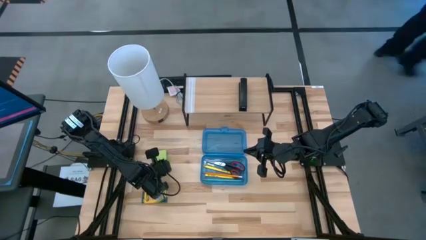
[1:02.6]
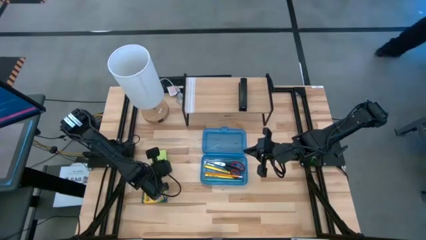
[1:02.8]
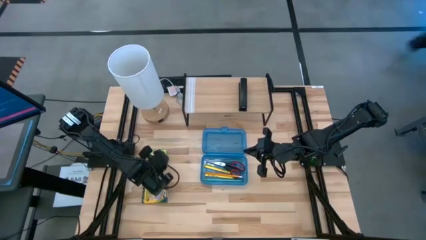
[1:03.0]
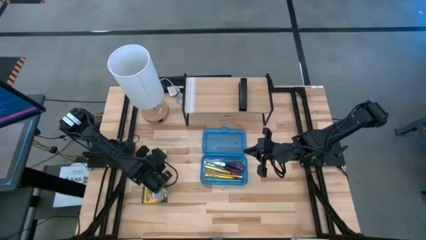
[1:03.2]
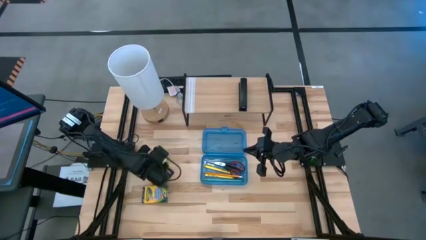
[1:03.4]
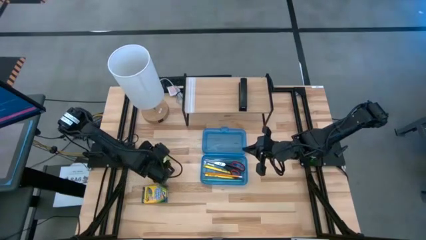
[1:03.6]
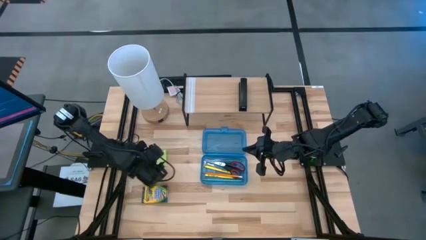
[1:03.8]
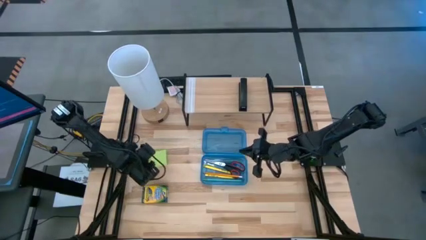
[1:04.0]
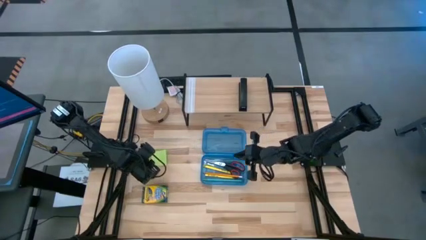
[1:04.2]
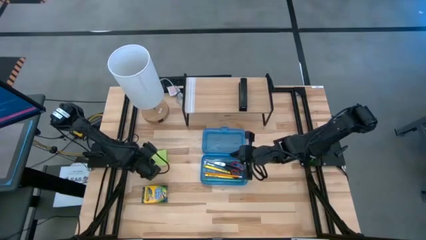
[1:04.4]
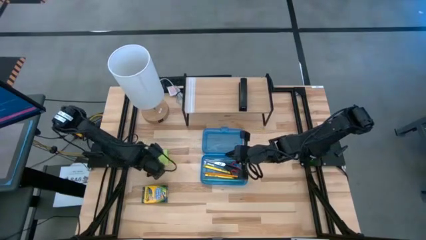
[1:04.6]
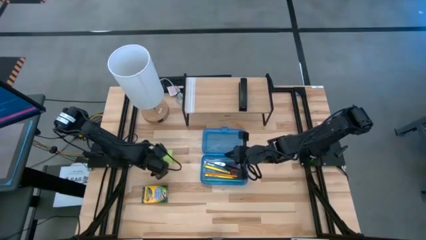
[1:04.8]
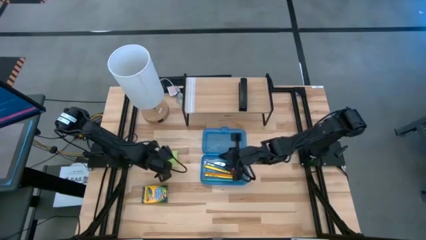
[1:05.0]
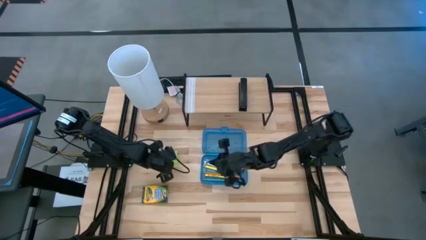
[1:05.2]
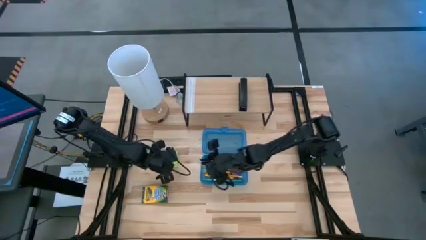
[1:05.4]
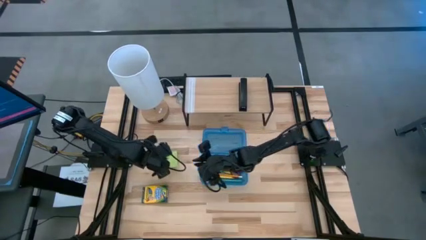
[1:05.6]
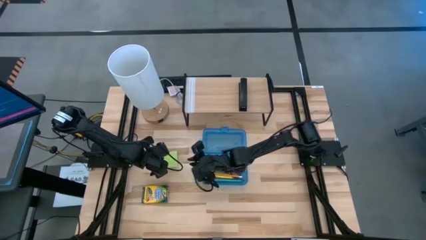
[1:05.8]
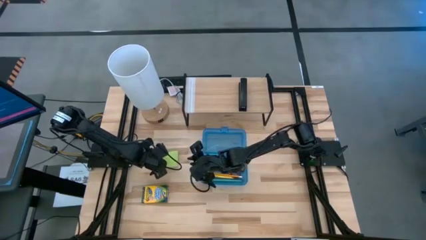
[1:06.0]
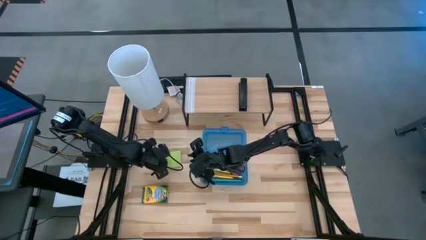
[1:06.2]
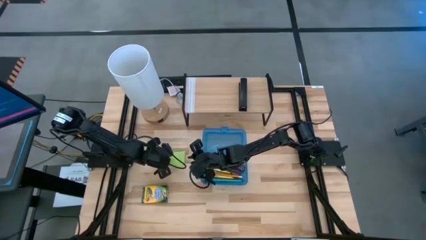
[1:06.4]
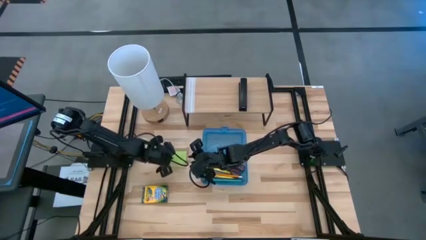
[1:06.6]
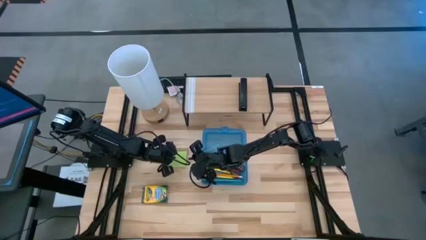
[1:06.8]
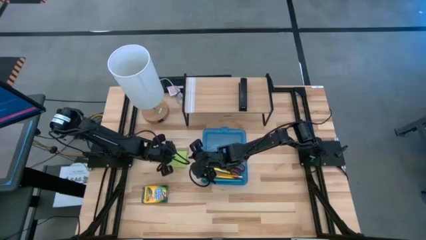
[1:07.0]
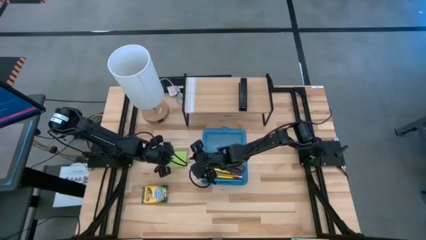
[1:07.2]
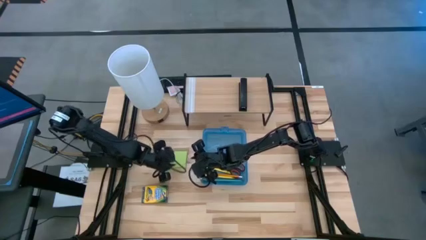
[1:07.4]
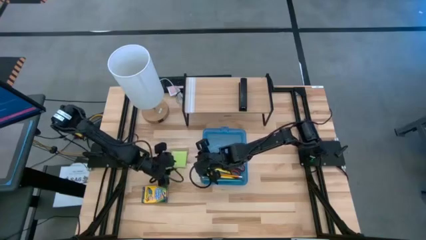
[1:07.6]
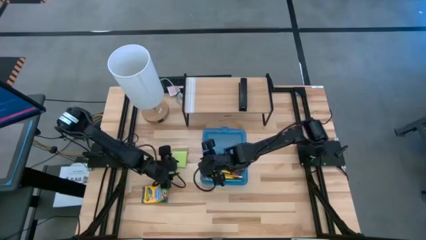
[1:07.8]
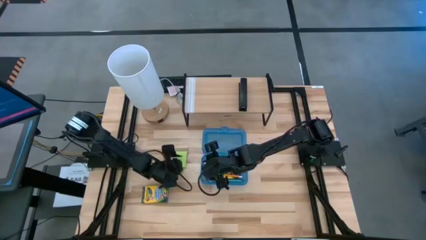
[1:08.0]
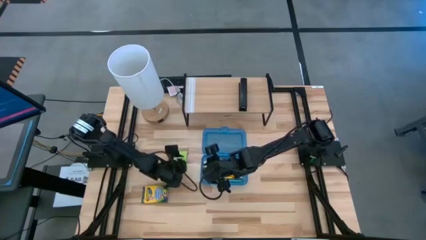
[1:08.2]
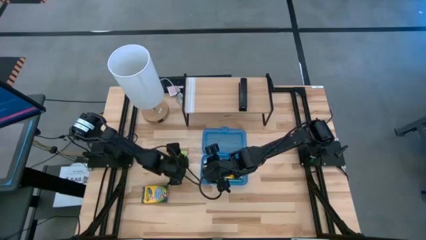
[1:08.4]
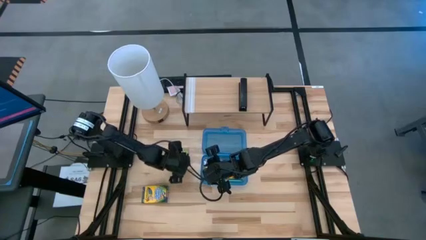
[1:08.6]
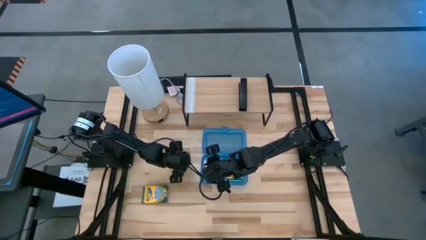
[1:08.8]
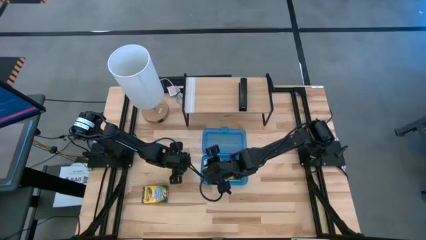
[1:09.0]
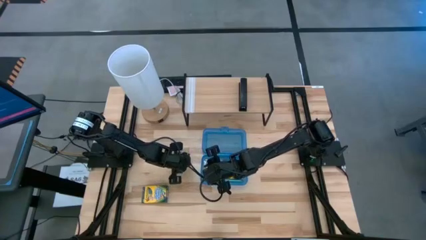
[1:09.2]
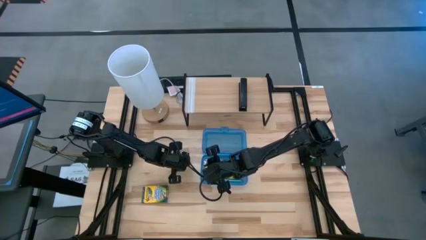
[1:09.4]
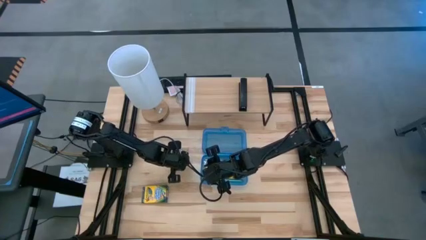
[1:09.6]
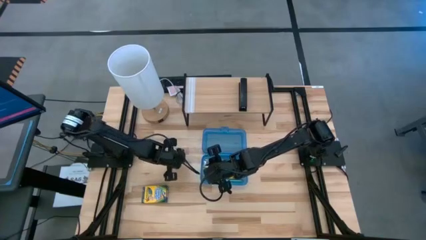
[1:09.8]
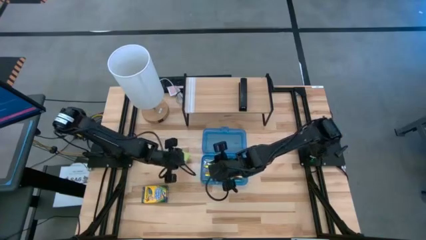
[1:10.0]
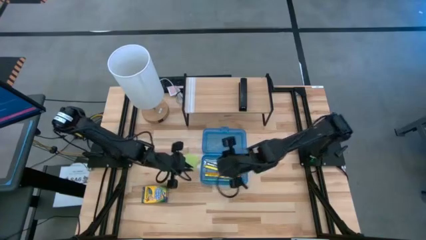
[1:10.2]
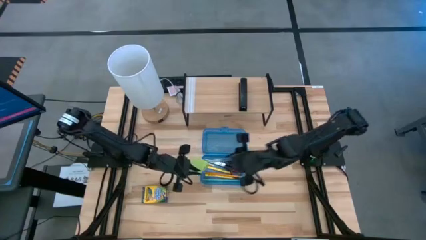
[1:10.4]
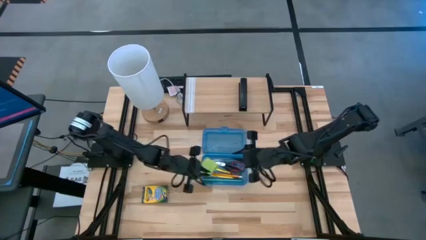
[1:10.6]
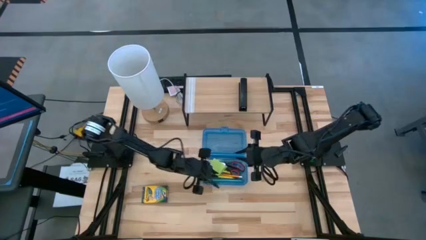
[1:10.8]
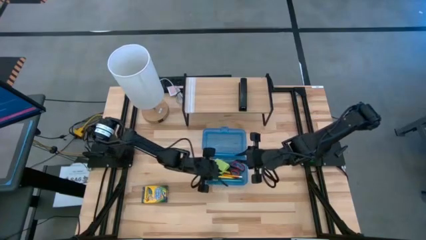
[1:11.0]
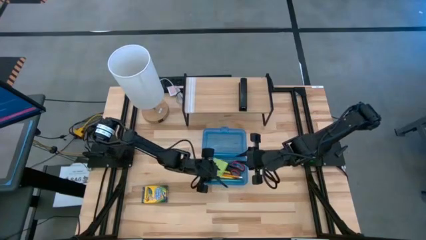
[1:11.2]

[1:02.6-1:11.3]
Task: Pack school essentials
Put the green sticky notes into the blue supply box

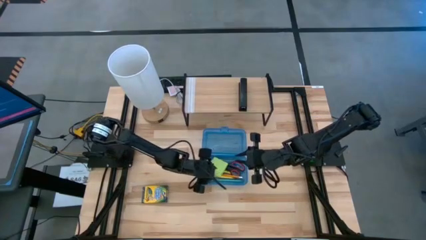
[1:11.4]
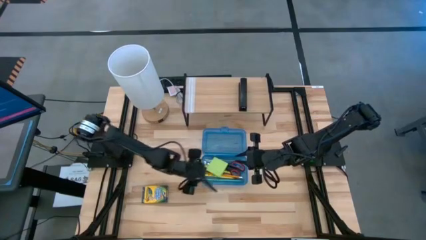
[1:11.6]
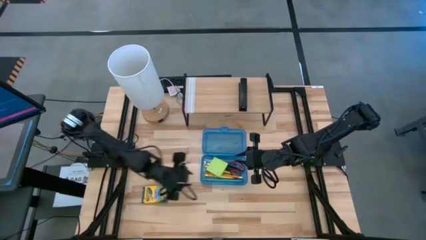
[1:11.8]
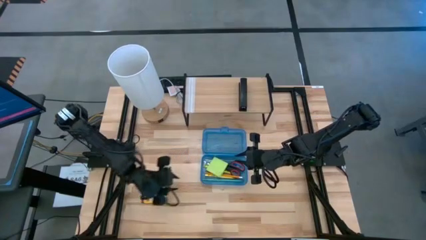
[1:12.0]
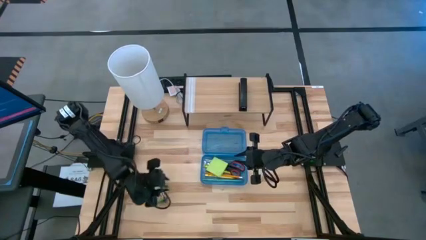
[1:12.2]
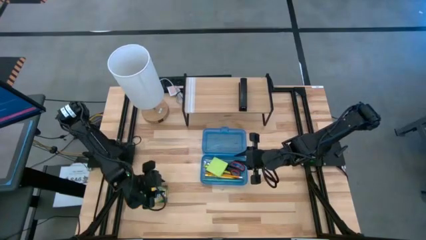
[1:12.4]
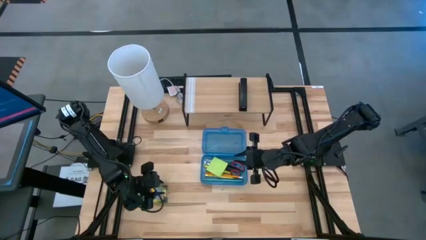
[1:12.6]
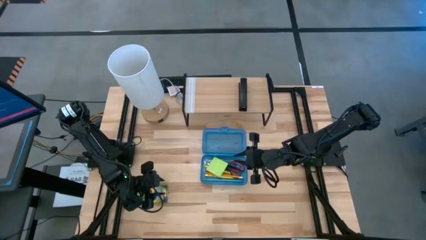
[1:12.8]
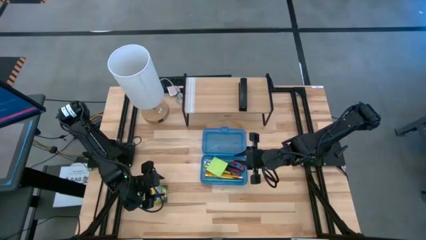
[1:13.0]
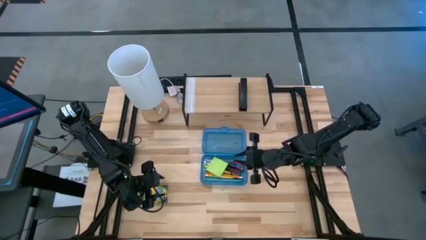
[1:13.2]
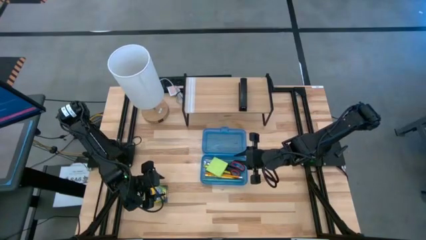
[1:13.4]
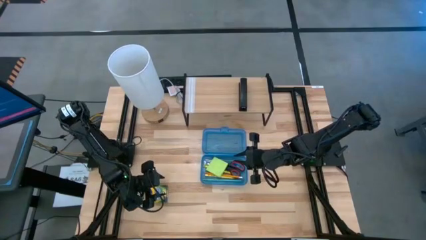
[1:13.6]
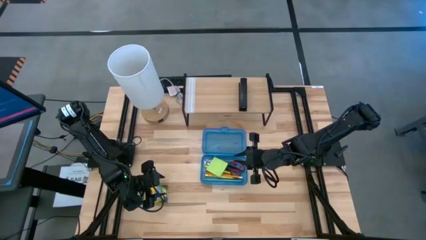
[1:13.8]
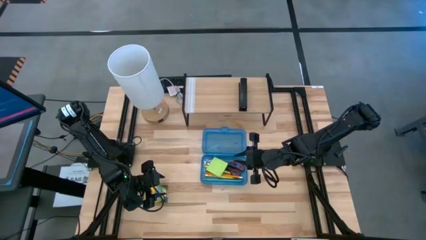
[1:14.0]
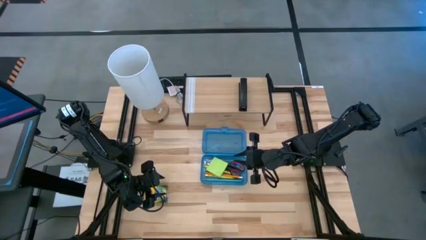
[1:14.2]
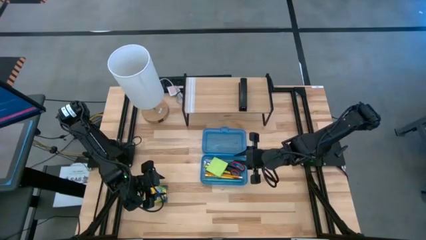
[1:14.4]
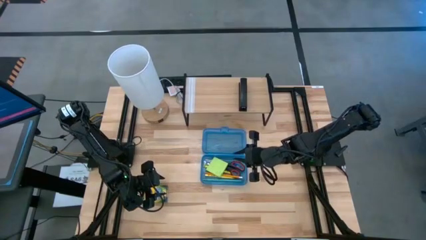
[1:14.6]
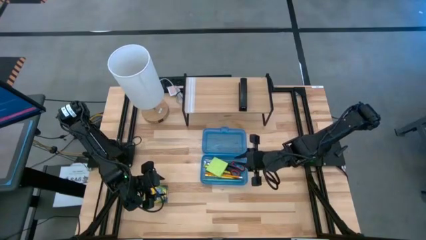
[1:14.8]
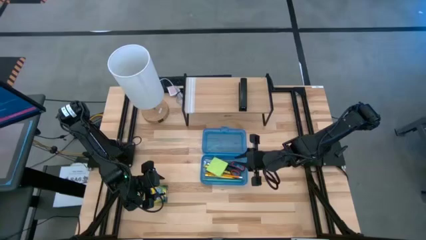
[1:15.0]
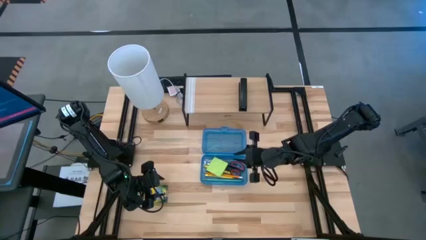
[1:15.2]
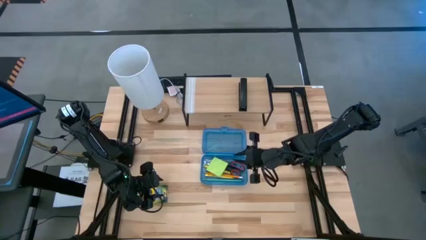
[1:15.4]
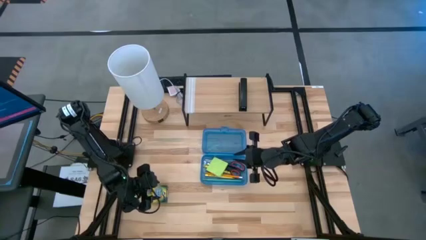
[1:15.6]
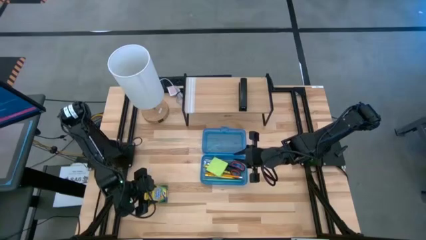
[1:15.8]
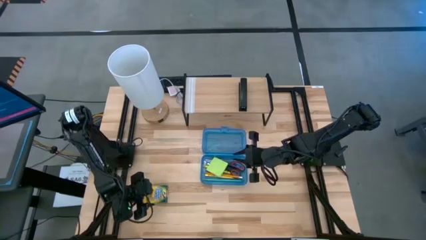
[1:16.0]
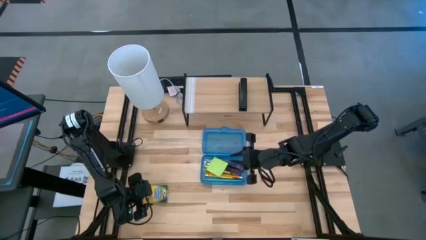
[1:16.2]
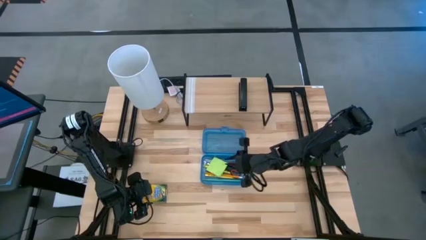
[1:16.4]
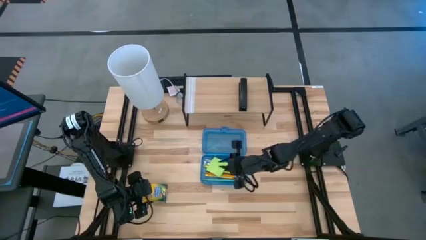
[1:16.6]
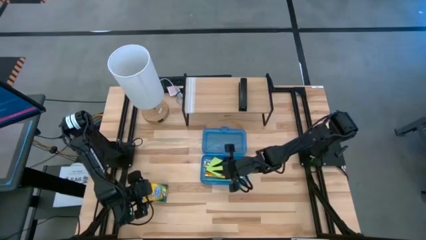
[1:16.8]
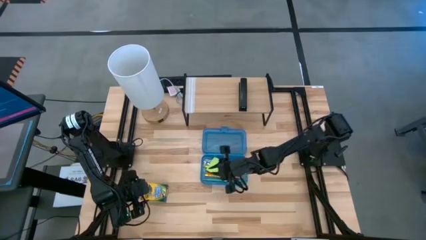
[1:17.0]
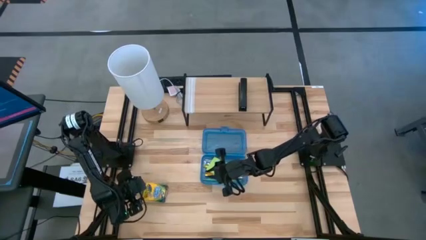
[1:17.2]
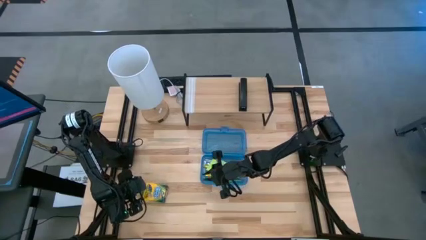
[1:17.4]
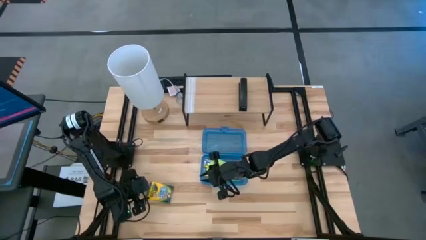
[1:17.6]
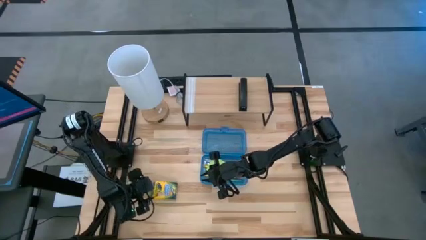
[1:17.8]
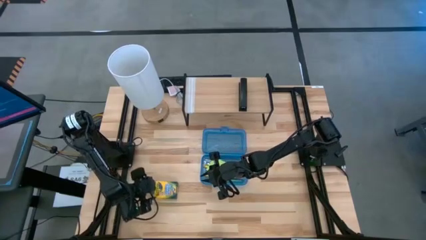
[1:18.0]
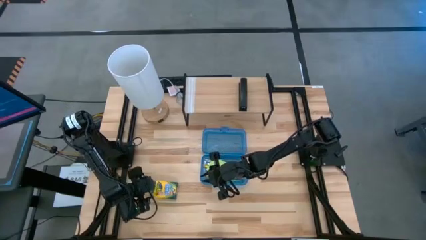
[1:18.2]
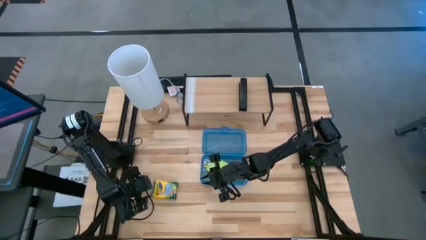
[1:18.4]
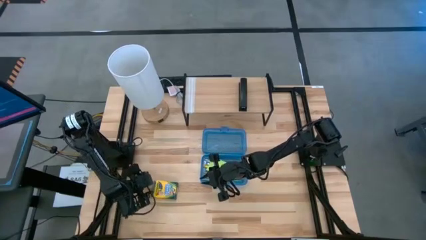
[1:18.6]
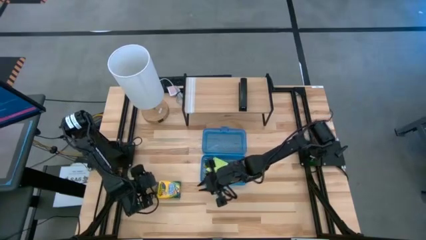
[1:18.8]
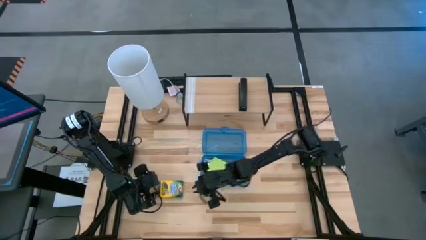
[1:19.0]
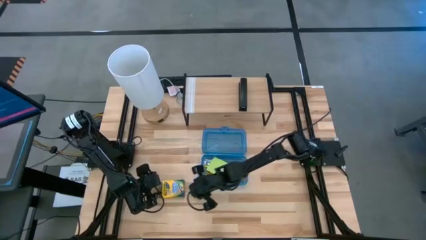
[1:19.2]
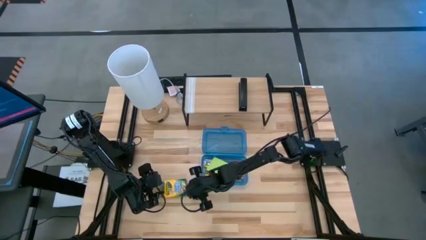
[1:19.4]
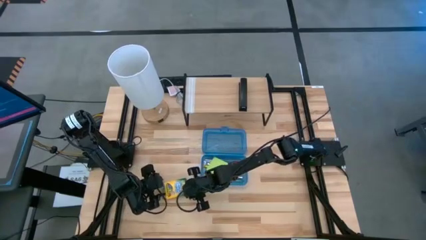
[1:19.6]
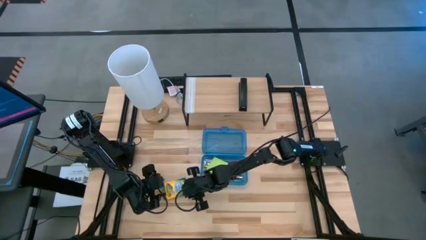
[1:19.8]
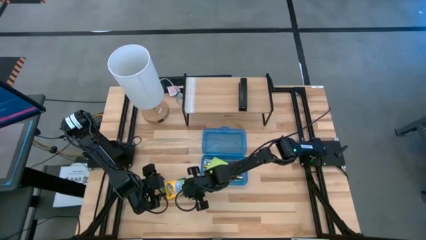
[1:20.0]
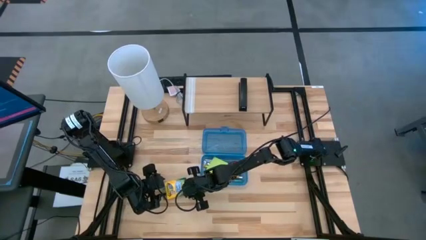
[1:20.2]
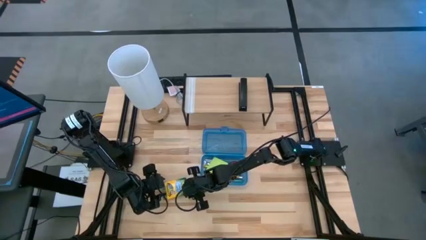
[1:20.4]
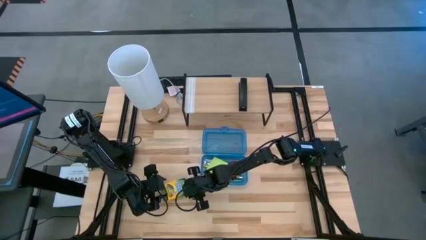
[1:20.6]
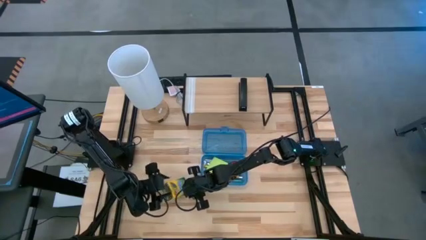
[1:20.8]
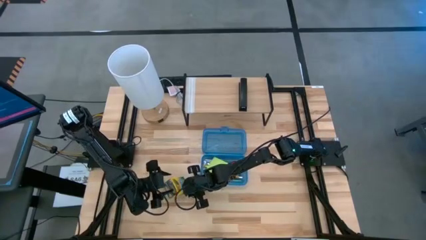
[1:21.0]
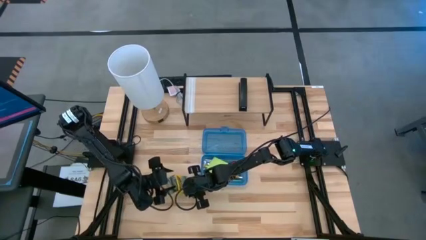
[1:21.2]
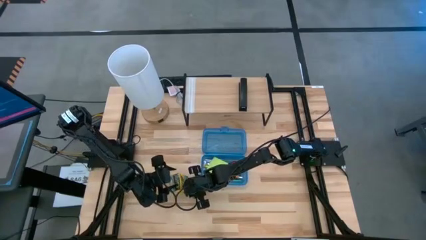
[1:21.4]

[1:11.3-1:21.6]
Put the yellow crayon box into the blue supply box
